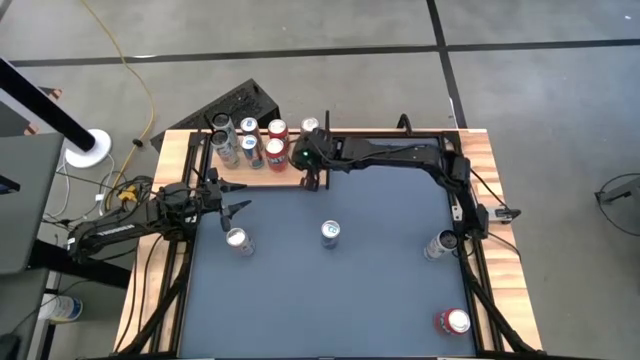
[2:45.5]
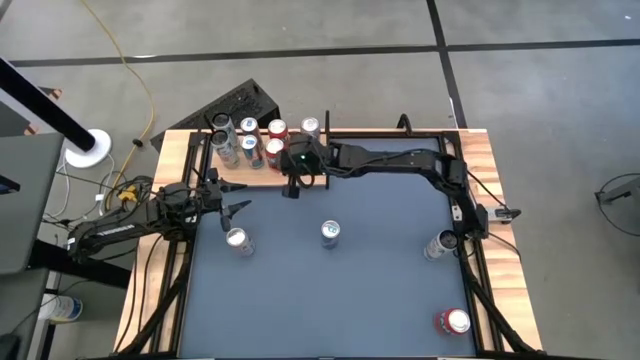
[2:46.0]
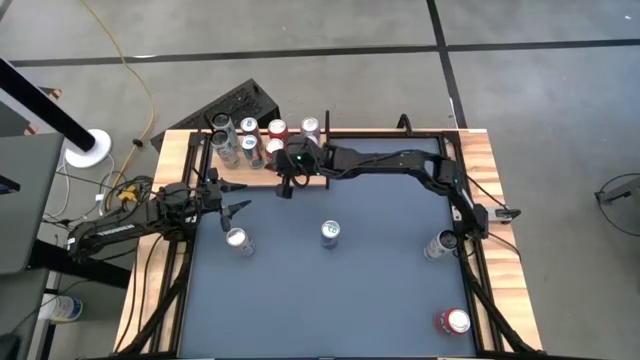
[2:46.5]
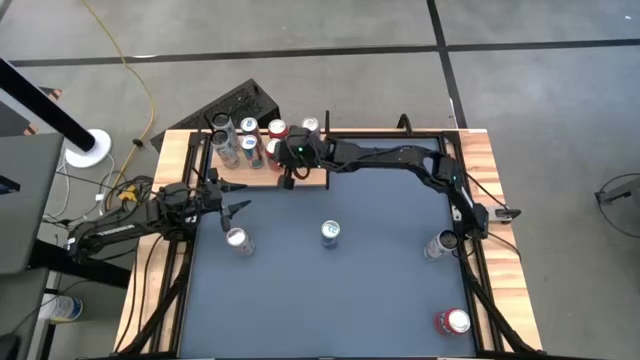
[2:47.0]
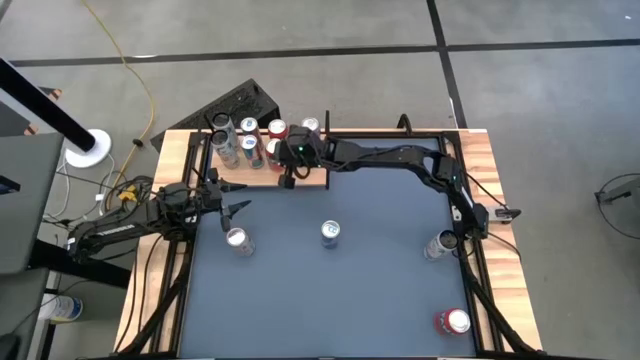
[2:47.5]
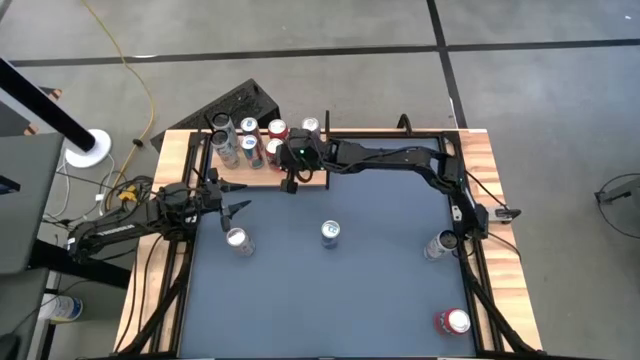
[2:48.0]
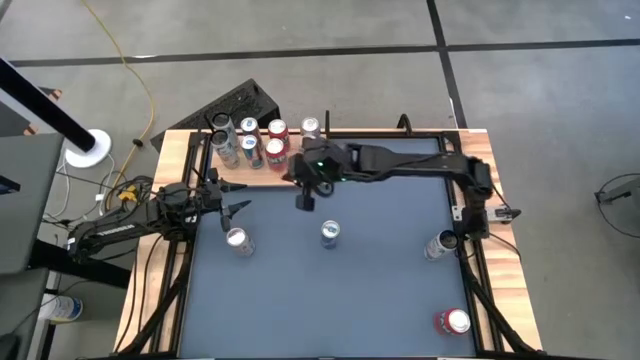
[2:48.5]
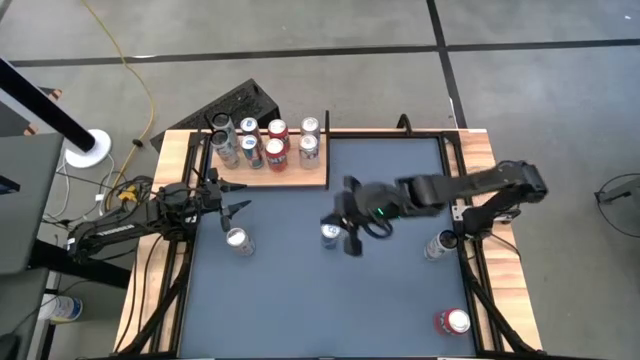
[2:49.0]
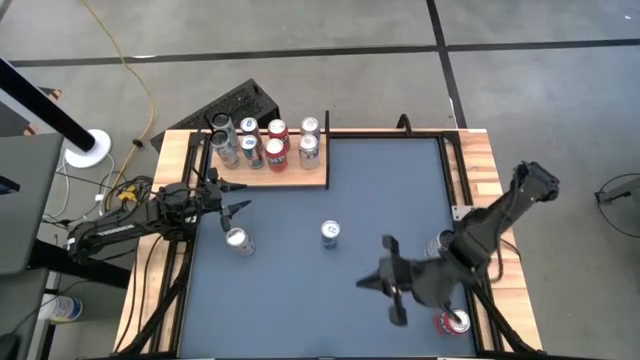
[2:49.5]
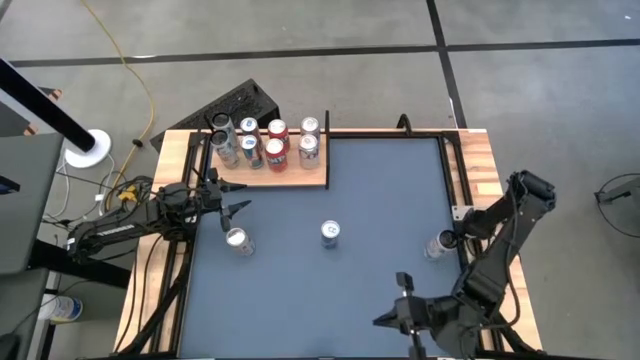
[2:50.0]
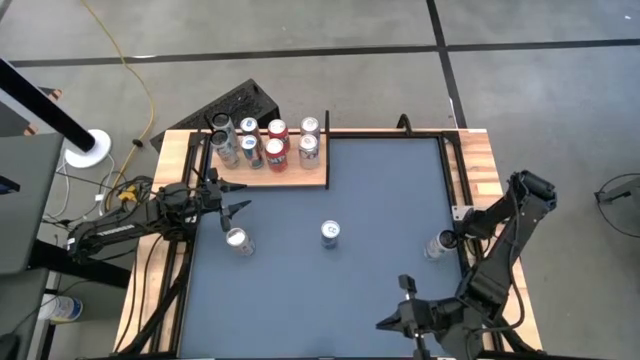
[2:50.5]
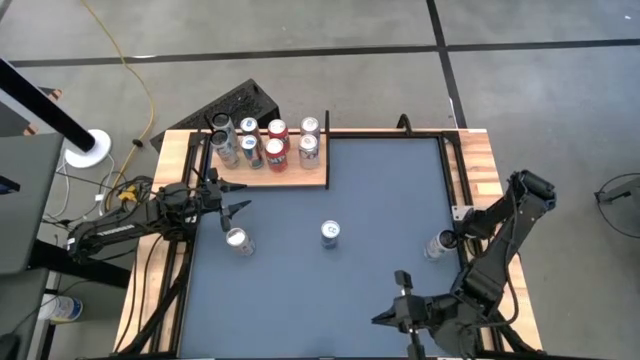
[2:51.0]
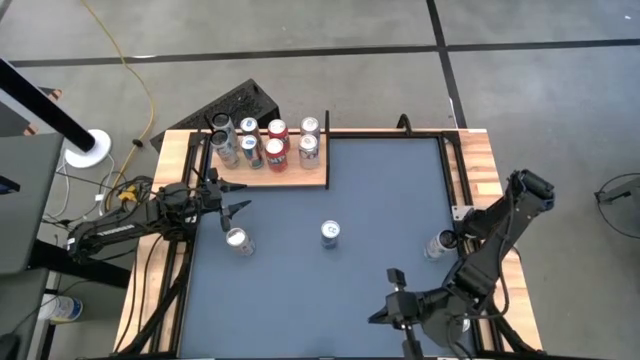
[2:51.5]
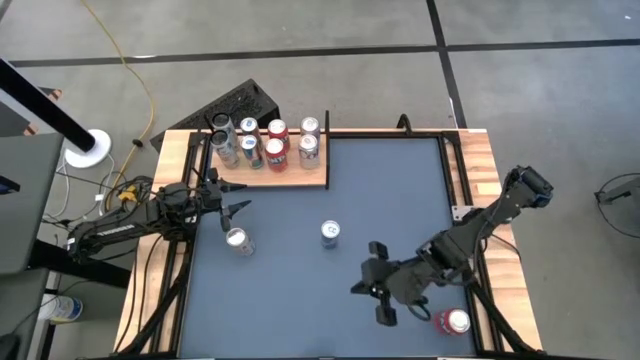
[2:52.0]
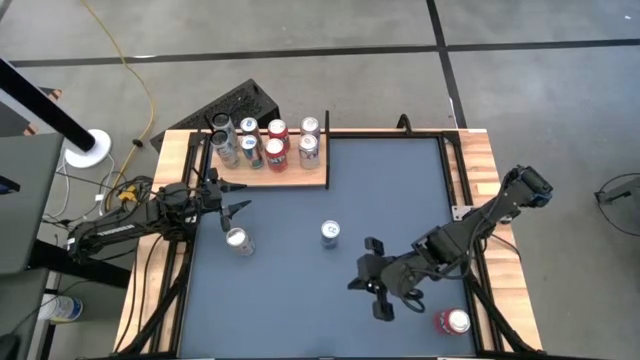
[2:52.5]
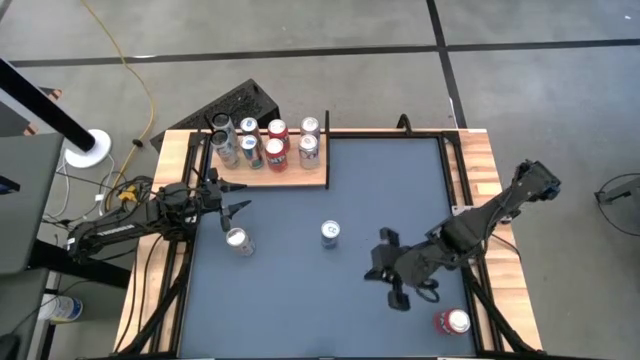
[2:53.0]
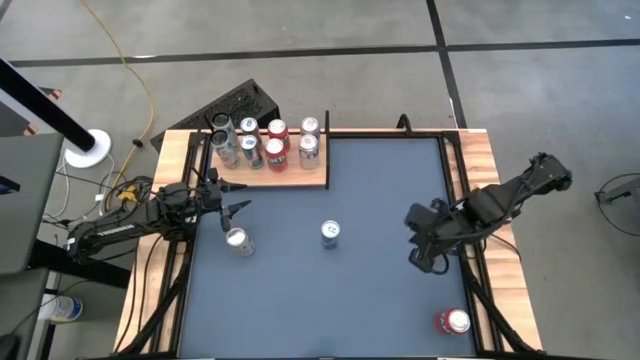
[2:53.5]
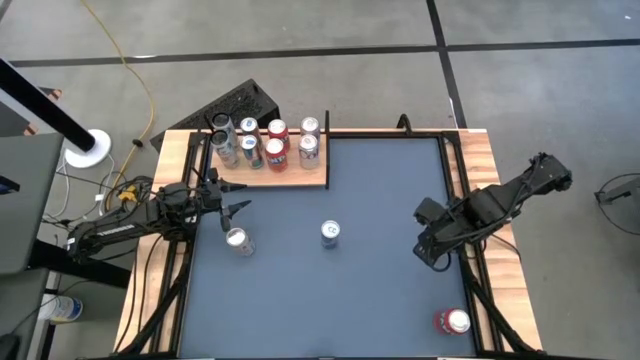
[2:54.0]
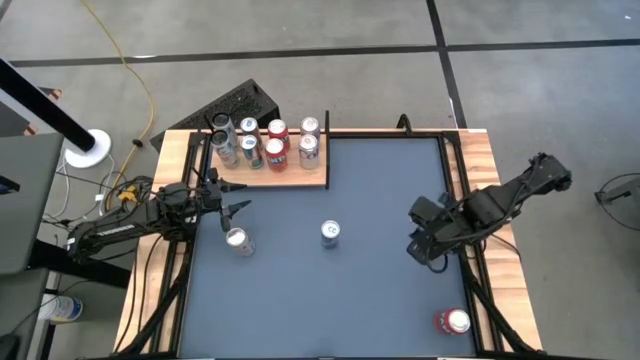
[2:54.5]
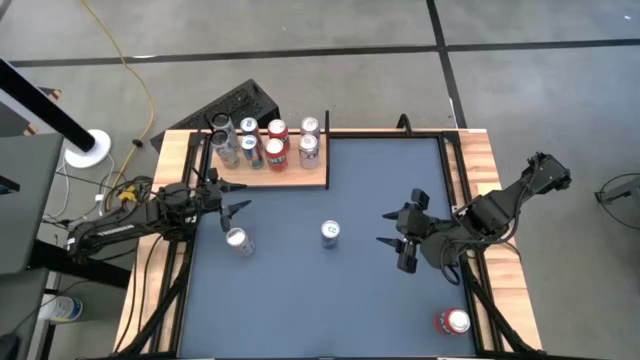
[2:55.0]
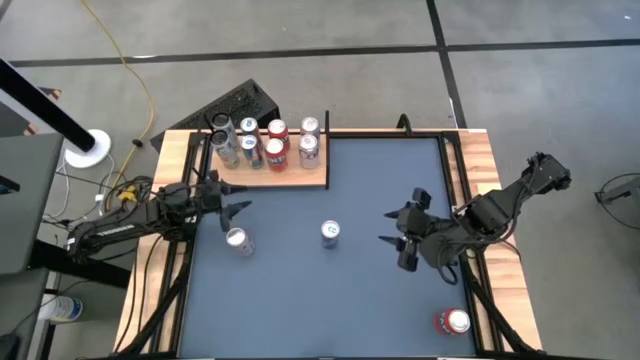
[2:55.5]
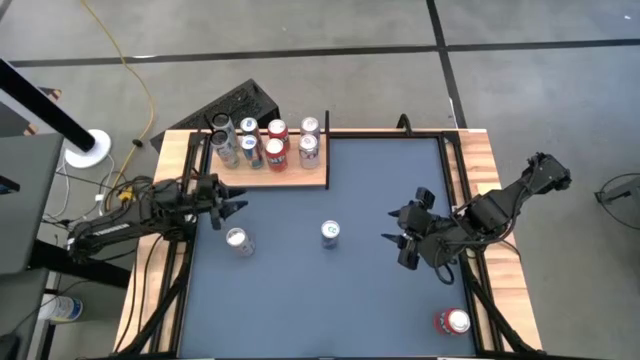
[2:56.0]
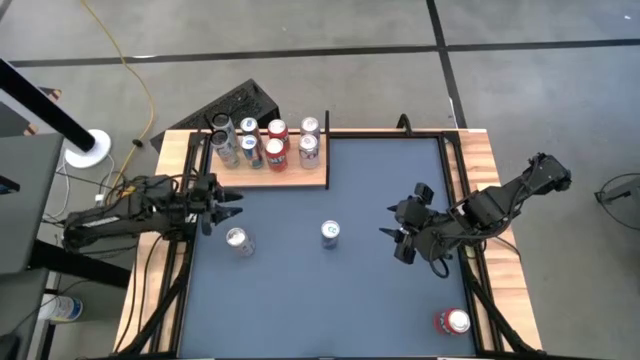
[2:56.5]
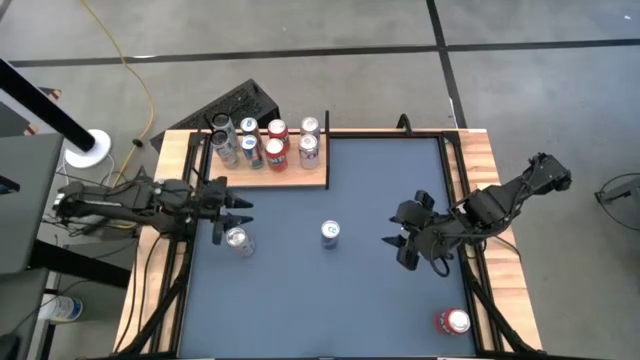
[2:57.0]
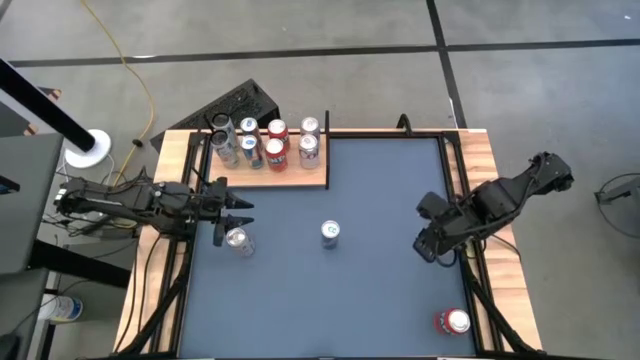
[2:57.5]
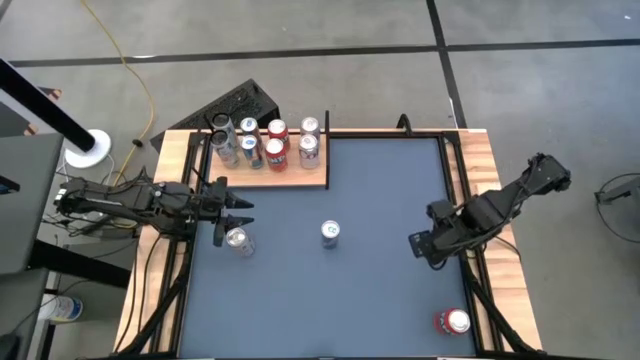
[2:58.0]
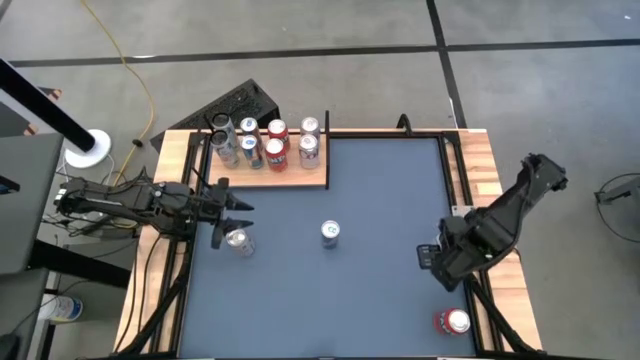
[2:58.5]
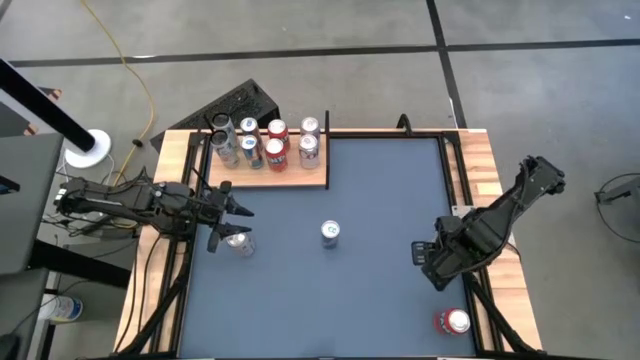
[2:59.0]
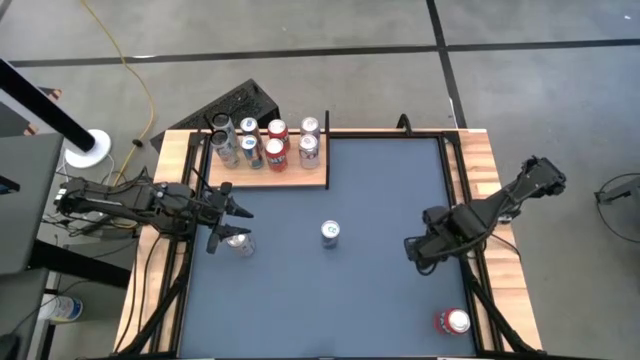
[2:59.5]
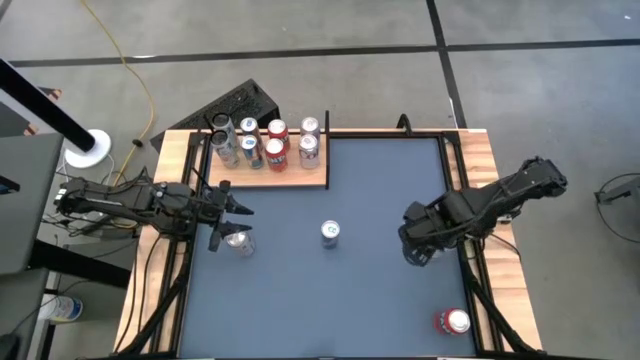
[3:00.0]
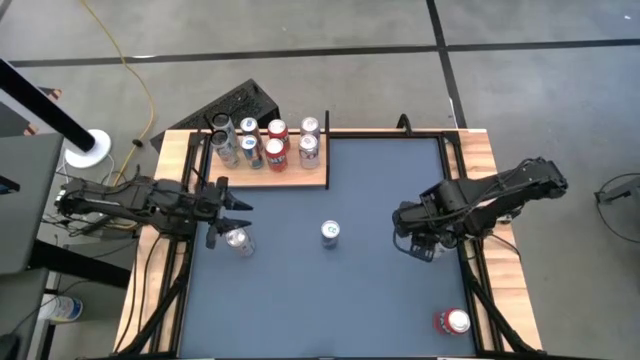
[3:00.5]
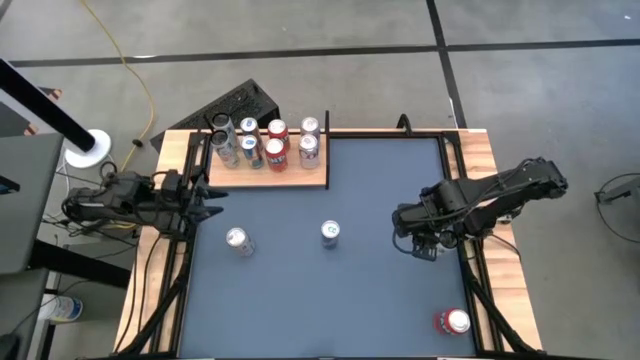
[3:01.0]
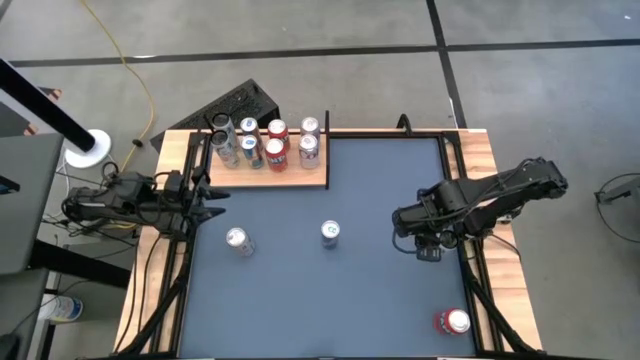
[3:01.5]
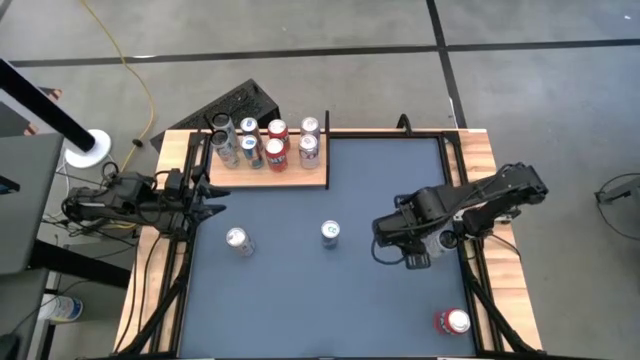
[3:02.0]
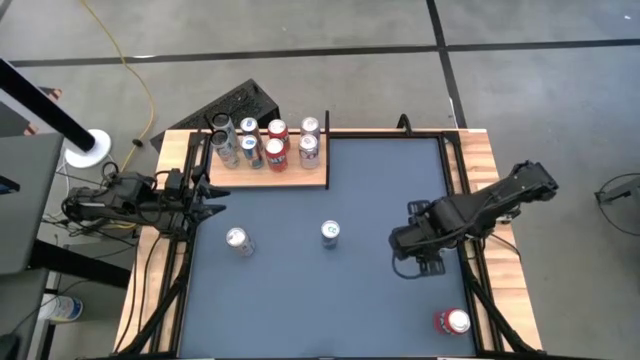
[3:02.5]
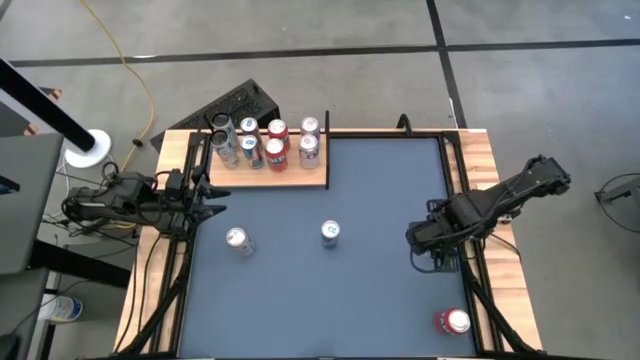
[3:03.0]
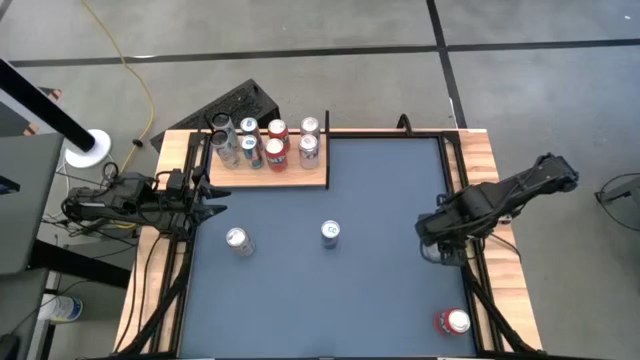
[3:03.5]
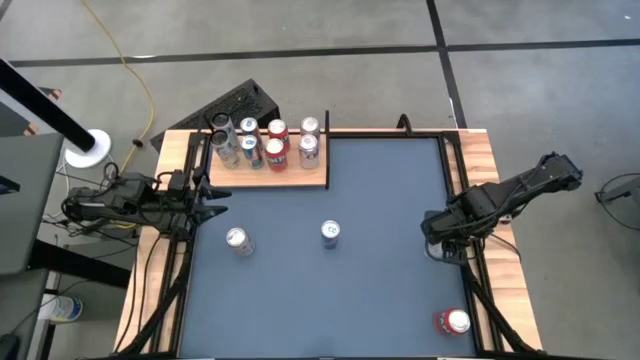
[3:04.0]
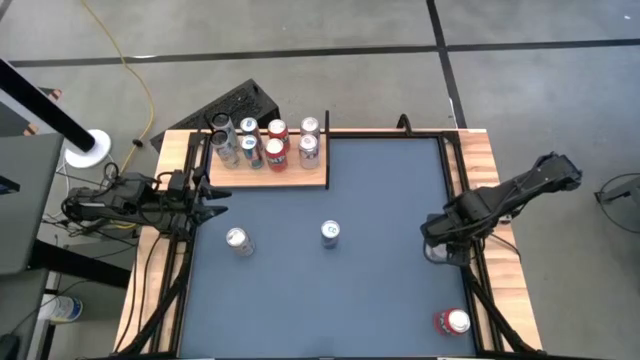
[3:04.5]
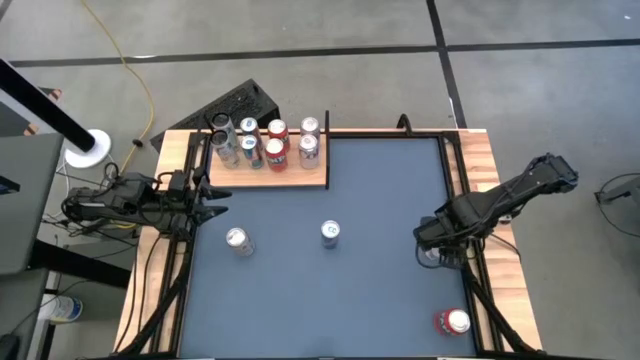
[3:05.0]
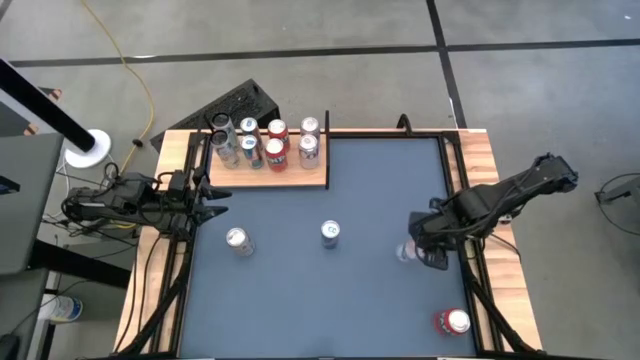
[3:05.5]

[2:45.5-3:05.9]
Task: Place canned beverage on shelf
Put the white pink soda can on the shelf aligned with the other white pink soda cans

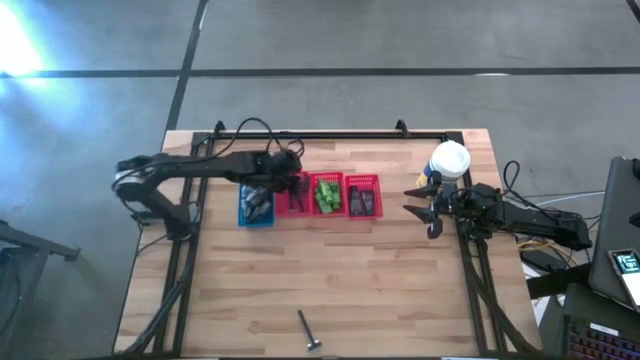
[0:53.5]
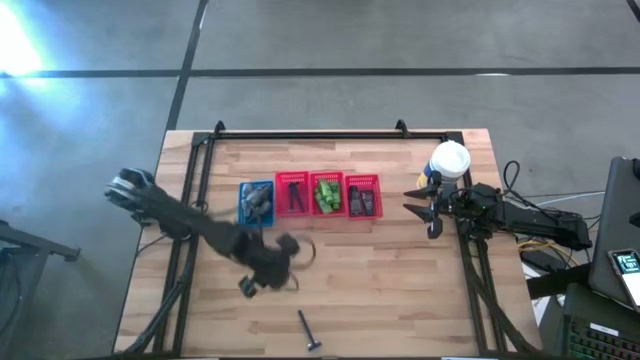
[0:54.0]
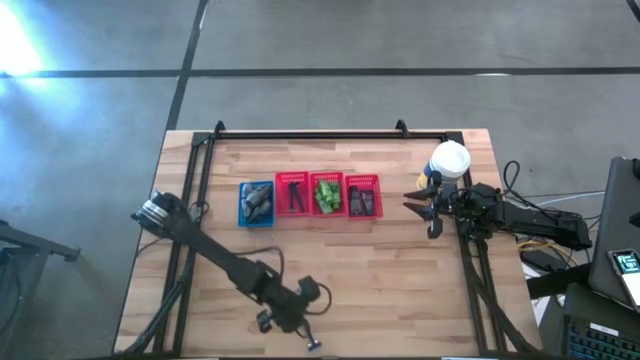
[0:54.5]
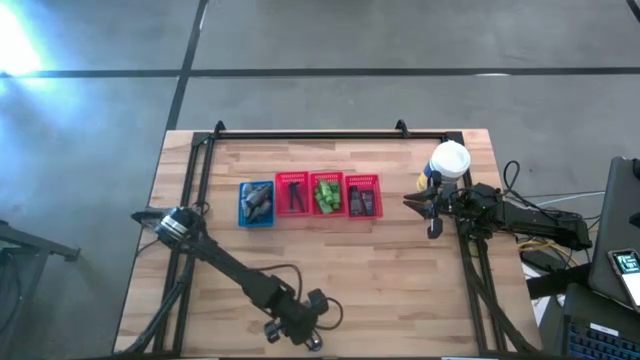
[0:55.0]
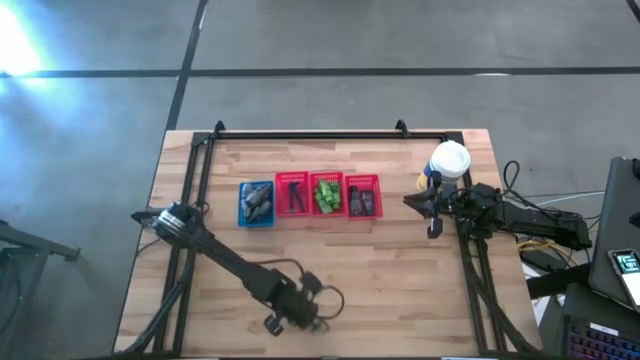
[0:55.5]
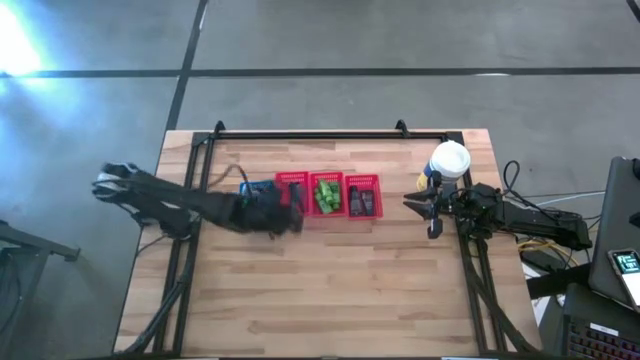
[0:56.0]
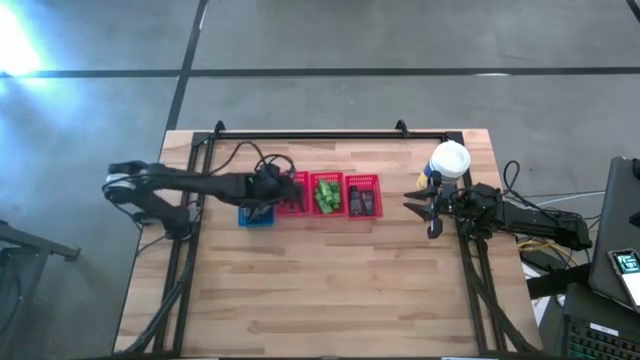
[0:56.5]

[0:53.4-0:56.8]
Task: Pick & Place Travel size toiletries
Put the blue razor into the left red bin
